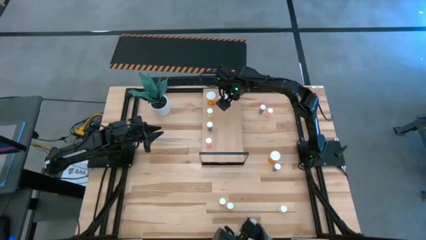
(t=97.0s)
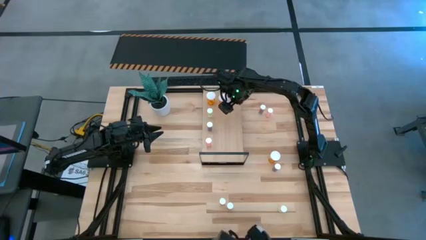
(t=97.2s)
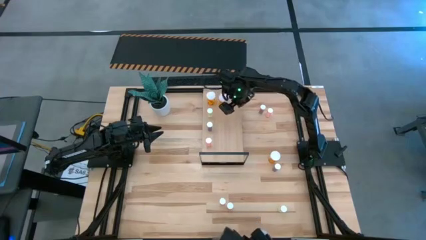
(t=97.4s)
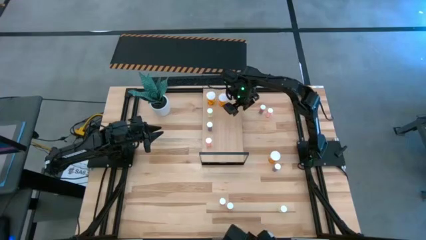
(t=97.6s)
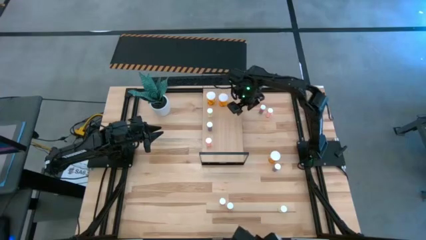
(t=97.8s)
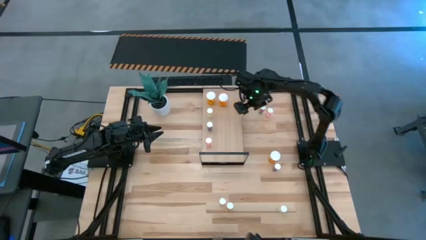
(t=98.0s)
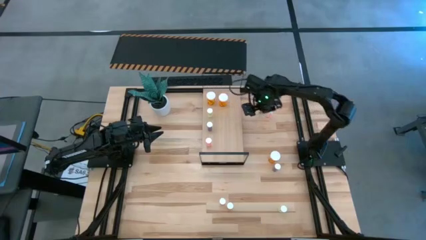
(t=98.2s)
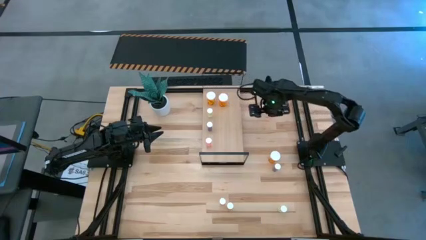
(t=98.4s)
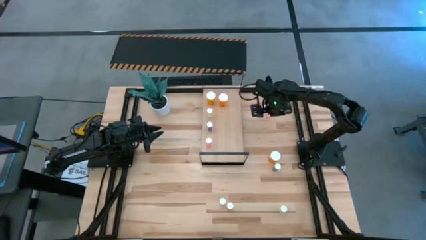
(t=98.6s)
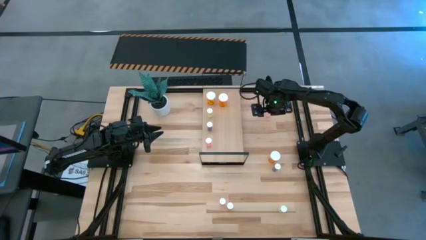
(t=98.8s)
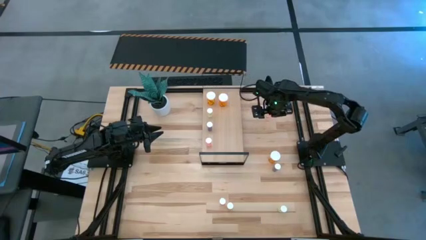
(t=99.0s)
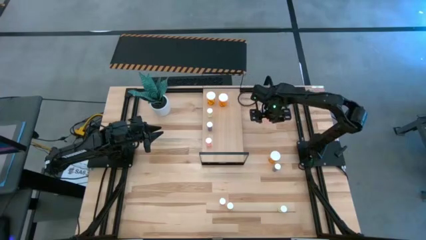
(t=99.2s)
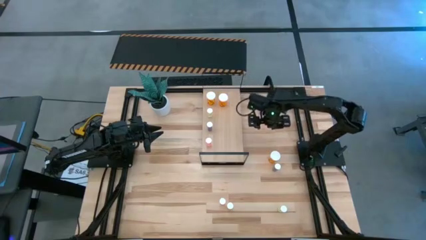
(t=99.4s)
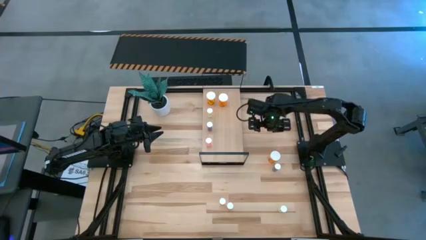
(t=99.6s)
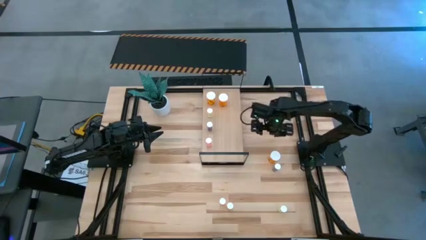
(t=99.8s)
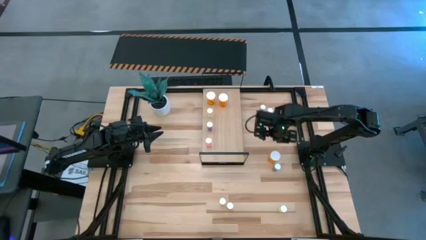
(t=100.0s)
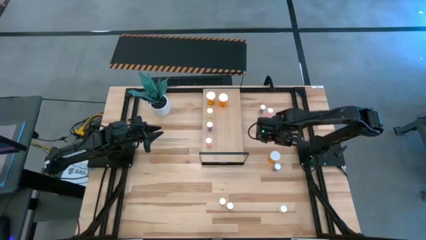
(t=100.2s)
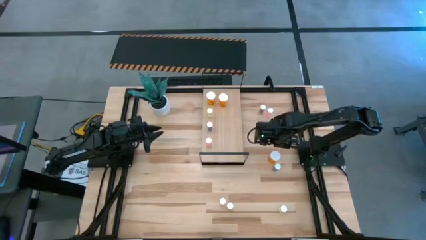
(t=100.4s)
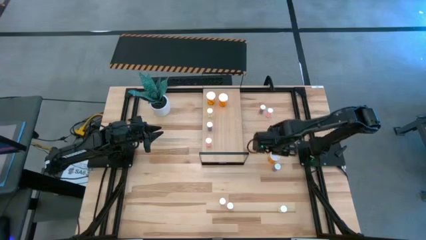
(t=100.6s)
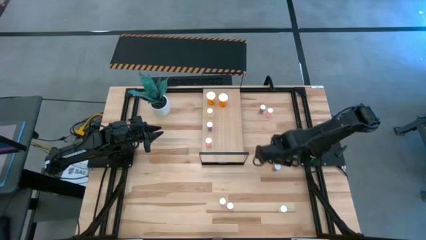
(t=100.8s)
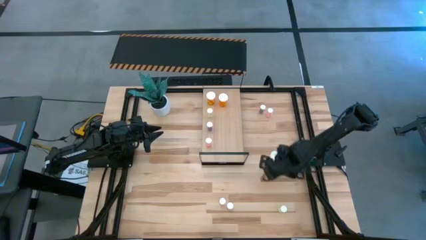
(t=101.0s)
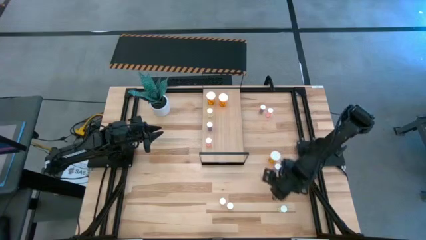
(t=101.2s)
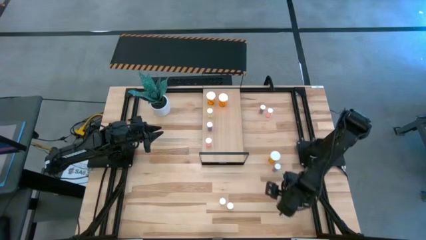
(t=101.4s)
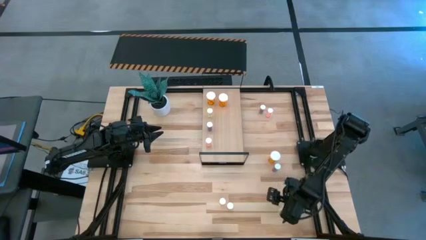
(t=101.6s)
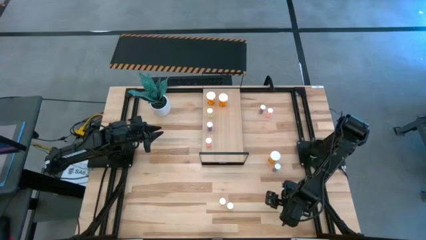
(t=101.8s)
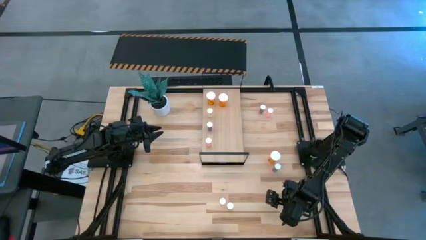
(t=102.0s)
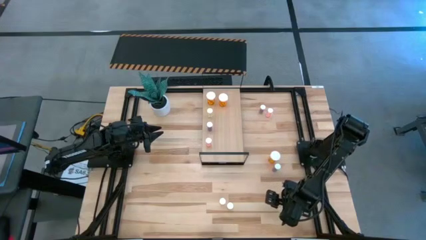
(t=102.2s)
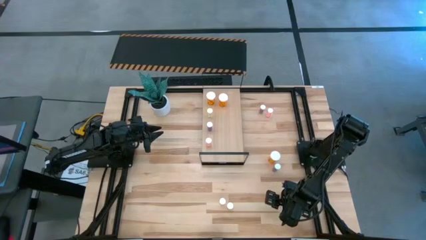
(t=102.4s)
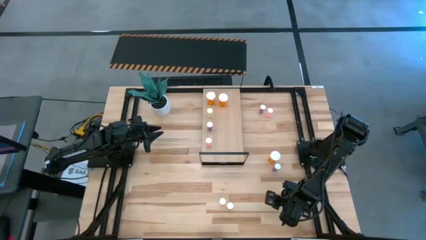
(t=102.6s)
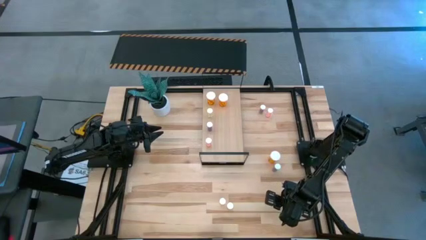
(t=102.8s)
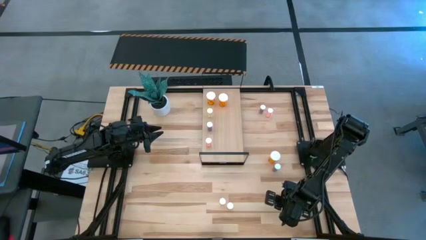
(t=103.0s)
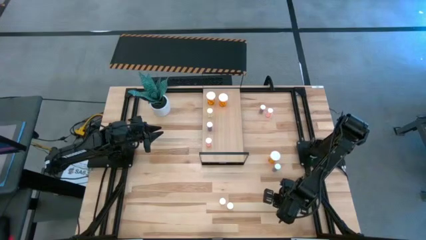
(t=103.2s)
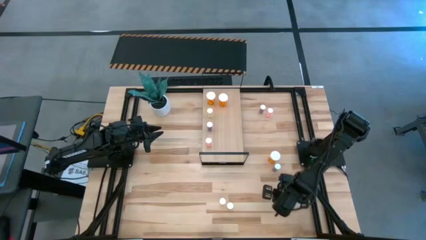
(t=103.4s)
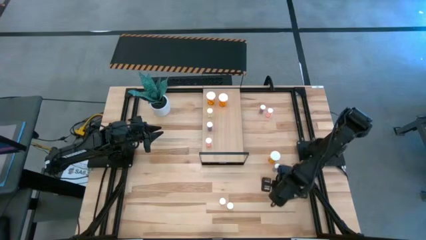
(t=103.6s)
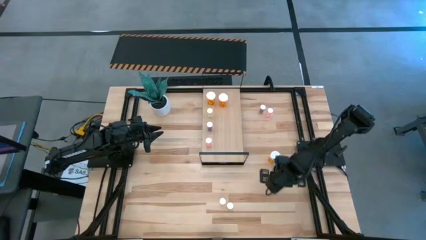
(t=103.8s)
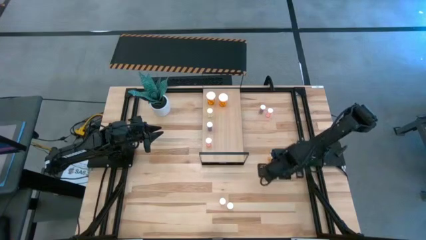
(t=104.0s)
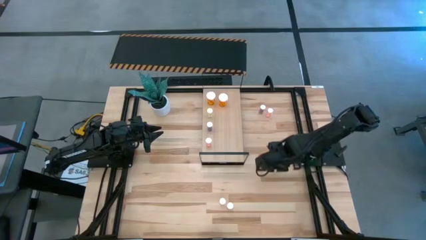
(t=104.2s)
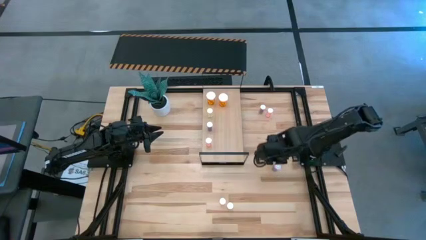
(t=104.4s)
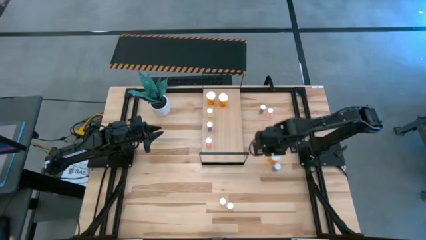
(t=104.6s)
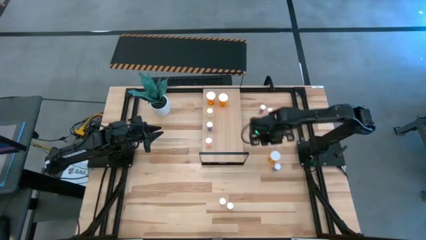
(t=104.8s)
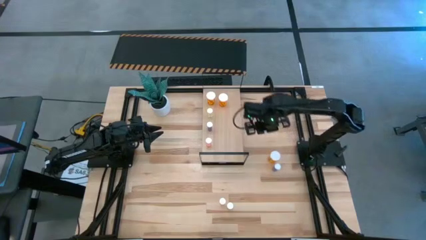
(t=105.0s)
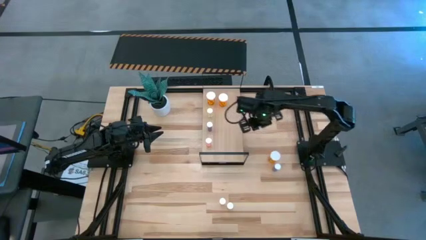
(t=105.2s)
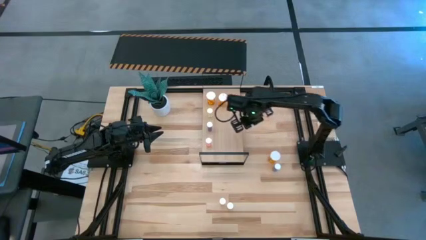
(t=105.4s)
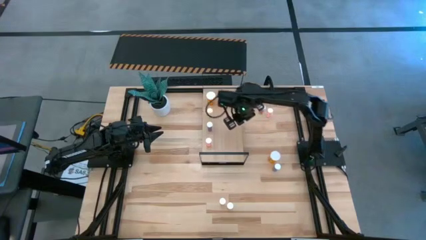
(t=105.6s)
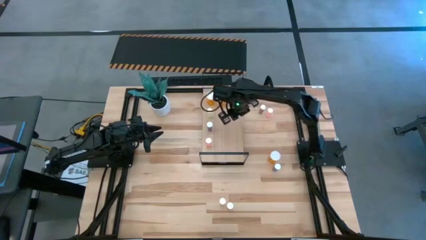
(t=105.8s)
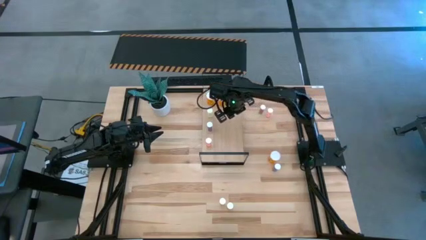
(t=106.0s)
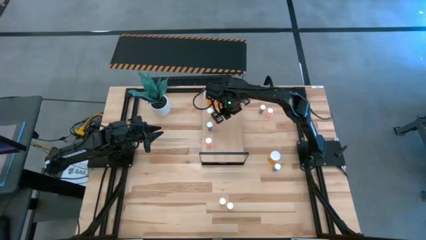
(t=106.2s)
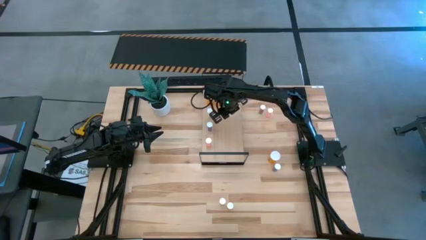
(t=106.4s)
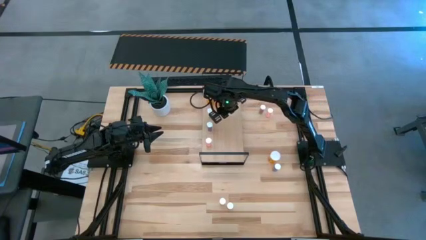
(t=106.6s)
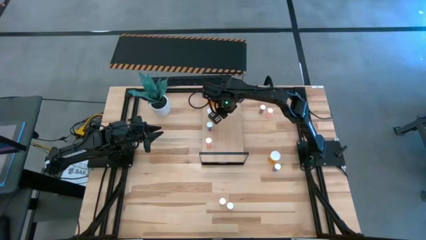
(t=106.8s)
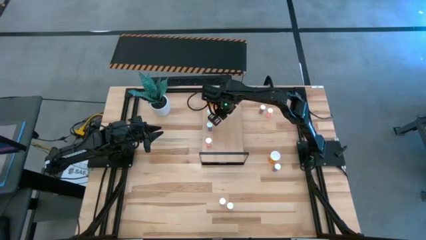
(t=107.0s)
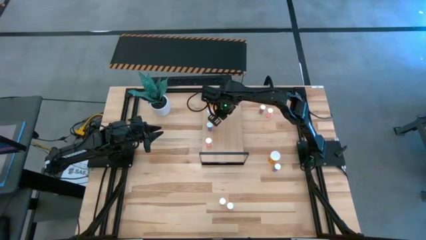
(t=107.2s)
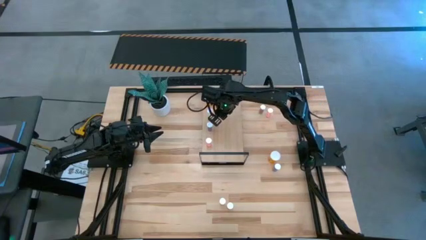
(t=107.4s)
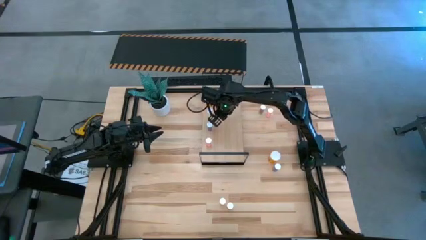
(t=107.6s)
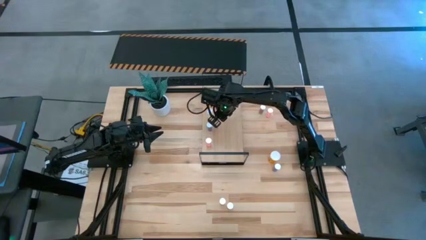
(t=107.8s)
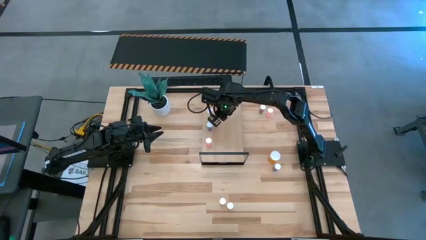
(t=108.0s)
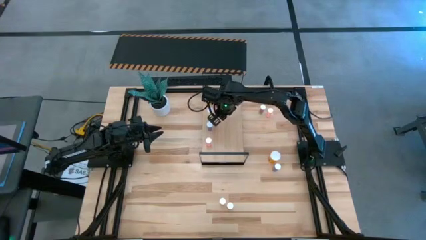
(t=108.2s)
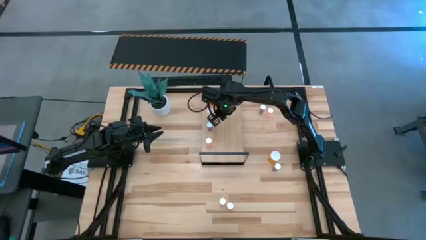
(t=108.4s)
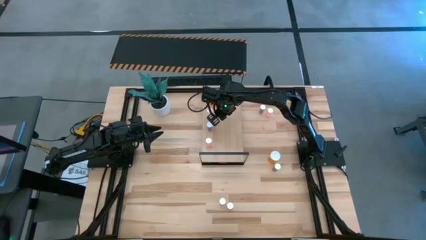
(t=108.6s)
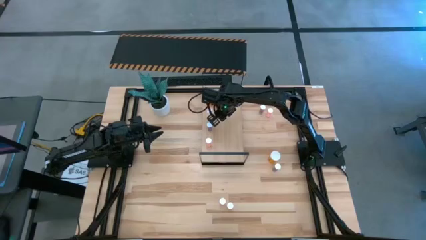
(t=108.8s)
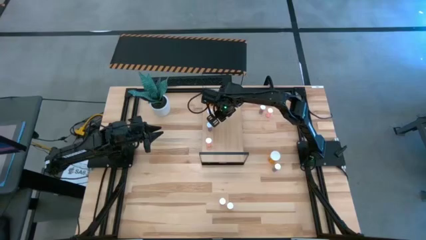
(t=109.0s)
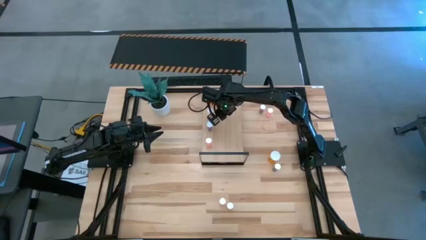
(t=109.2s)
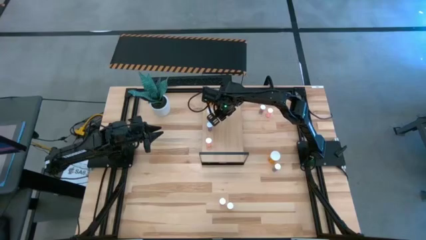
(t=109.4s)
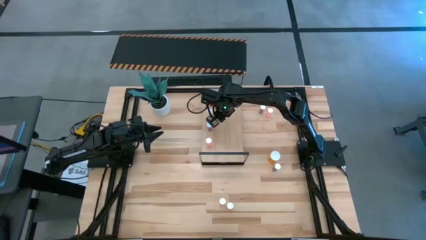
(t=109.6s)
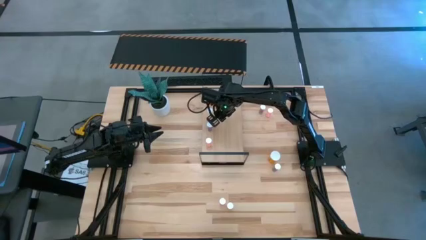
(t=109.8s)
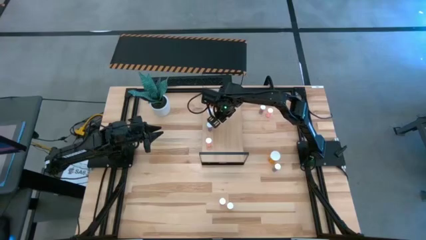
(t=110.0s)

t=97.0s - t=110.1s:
Task: Pick and place medicine bottles onto shelf by color
Put the bottom right small yellow pill bottle on the shelf aligned with the other small yellow pill bottle

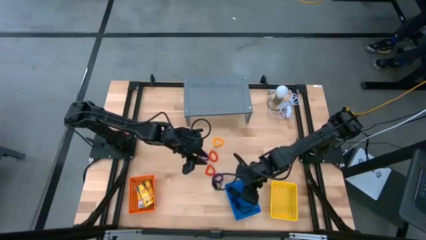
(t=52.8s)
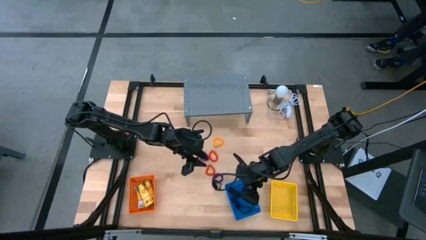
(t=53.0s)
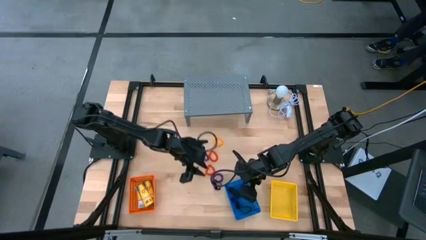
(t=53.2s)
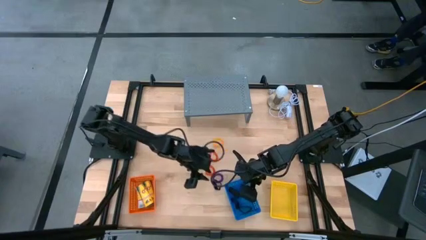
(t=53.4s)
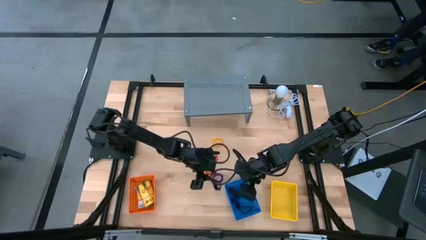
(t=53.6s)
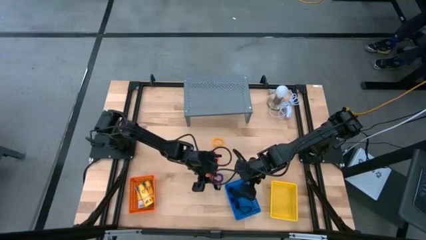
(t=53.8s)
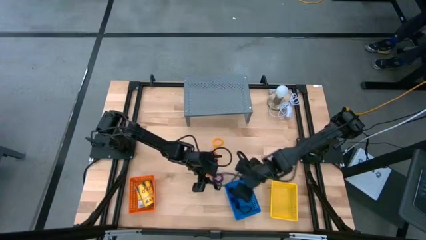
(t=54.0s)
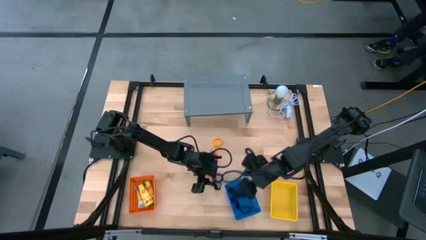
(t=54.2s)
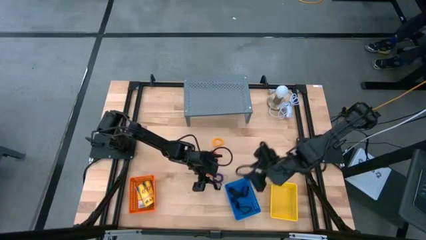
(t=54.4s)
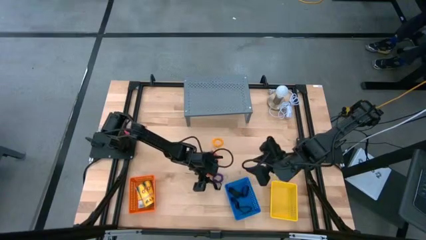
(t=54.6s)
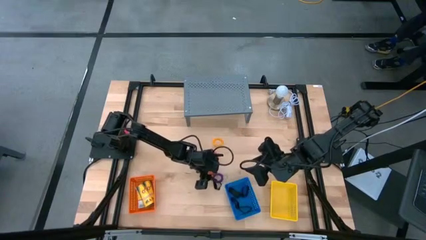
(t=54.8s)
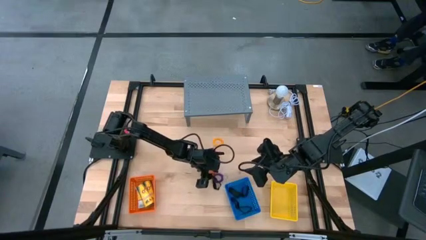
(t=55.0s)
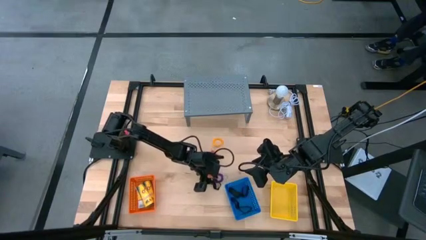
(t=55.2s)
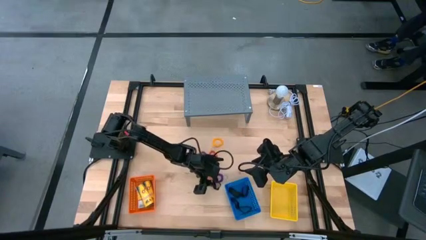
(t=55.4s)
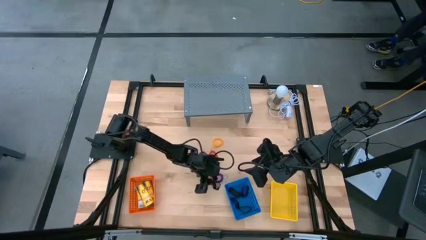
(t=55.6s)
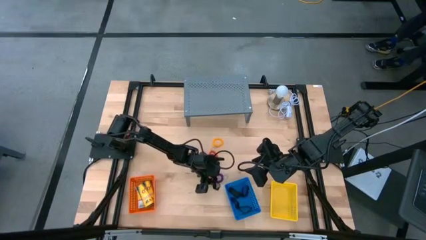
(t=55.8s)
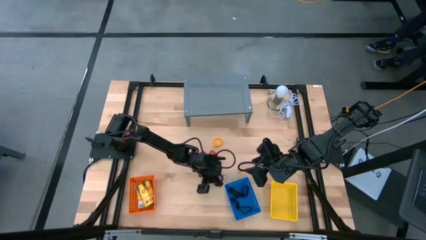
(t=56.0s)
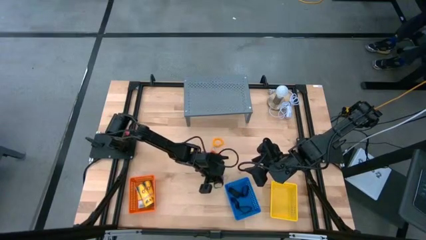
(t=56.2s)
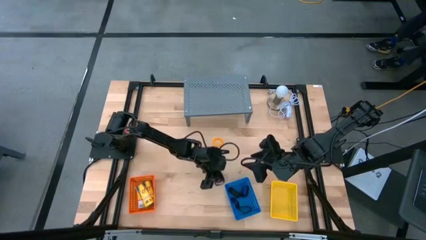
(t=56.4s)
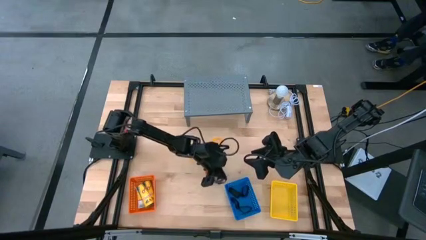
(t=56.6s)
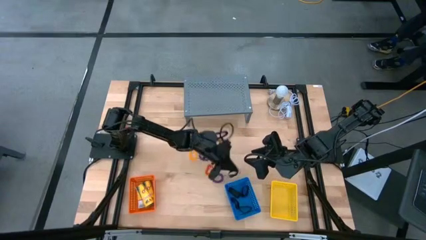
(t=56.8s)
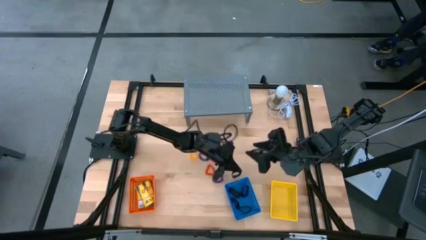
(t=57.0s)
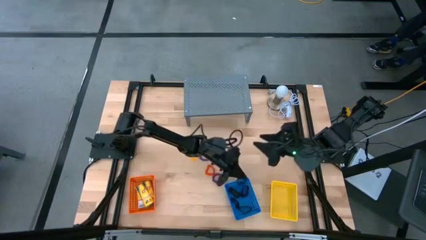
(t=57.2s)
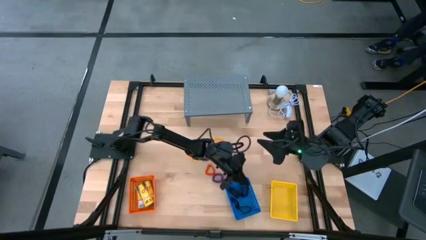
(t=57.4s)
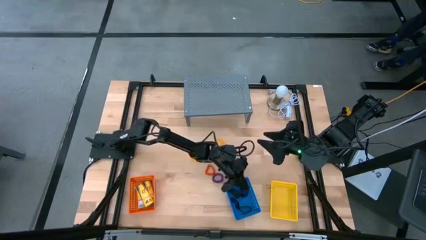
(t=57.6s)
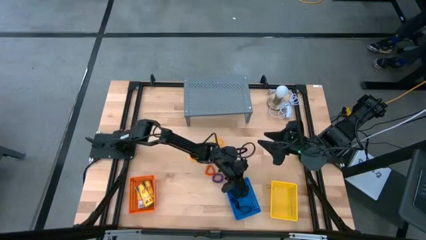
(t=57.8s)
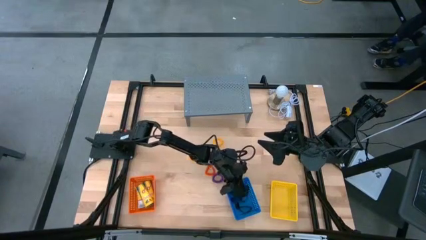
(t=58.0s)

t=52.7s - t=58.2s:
Task: Pick & Place Office Desk Supplies
Put the black rubber band into the blue bin
